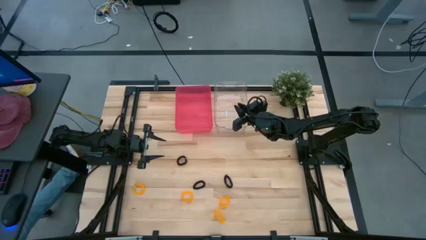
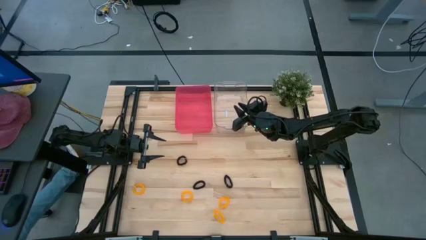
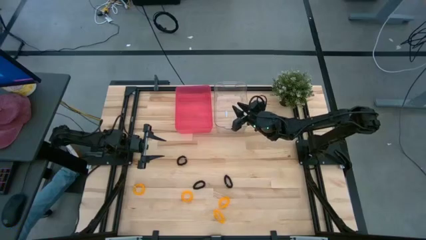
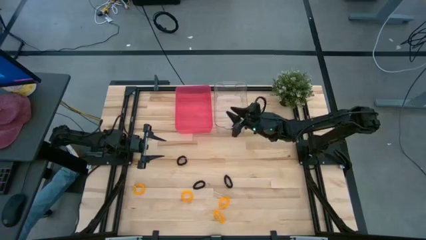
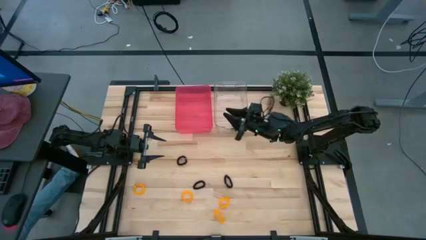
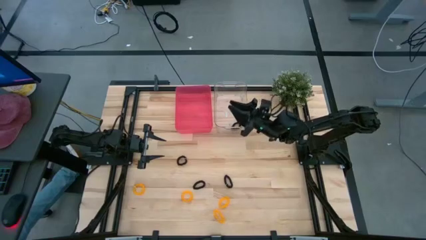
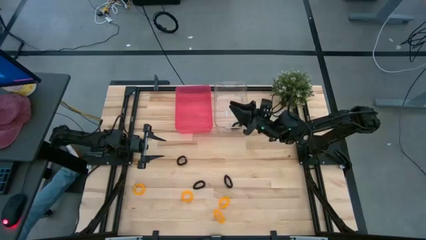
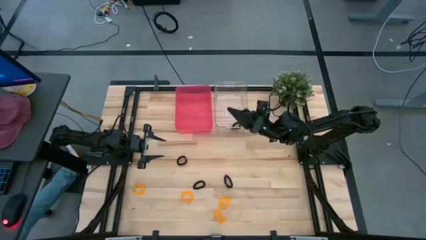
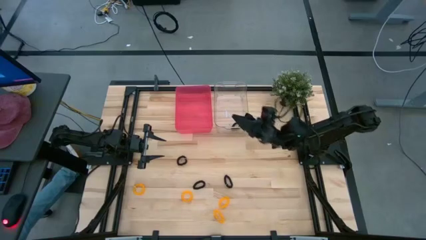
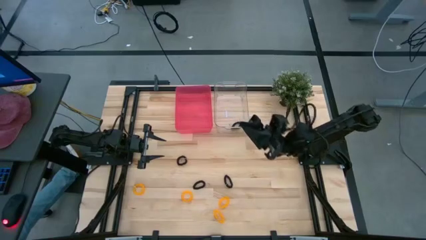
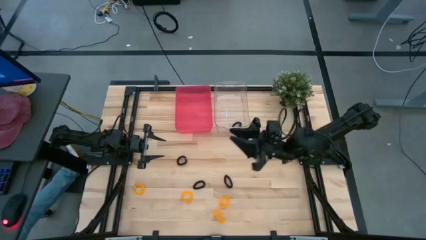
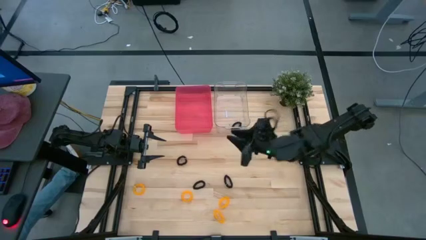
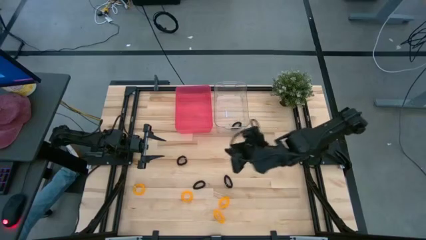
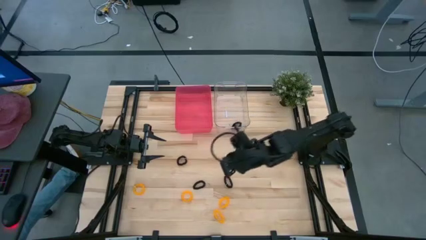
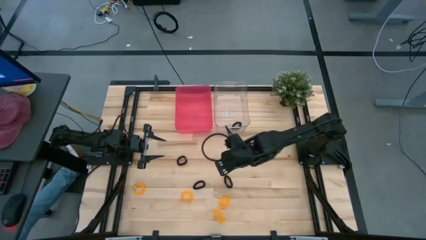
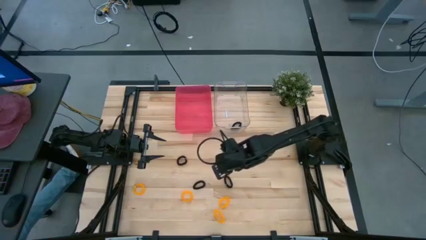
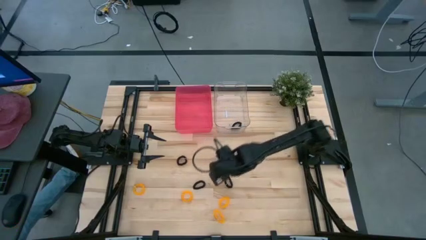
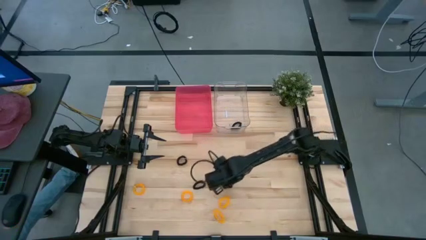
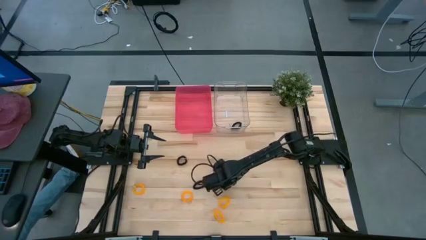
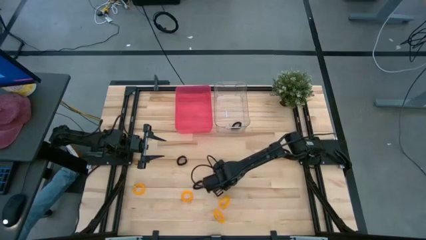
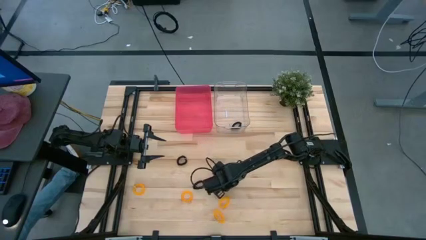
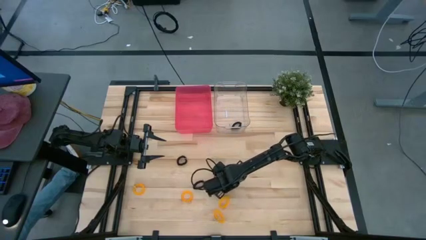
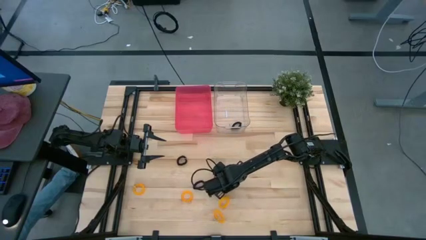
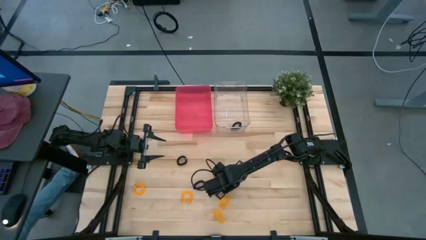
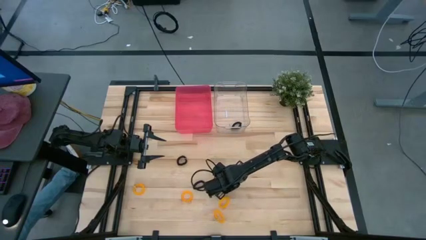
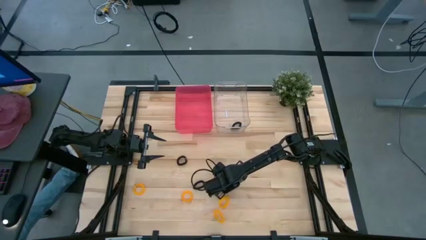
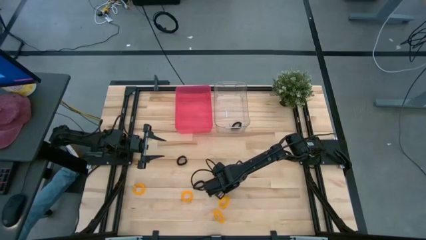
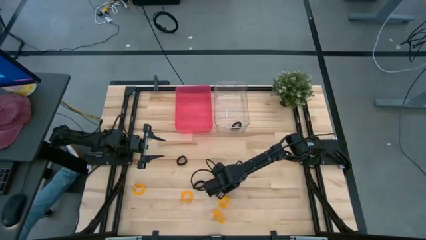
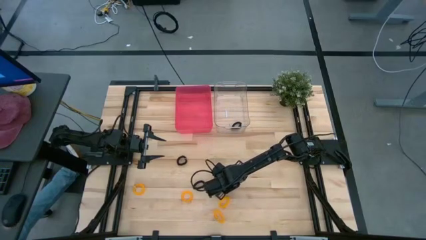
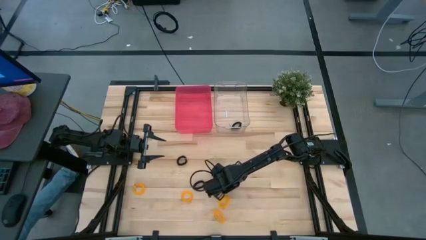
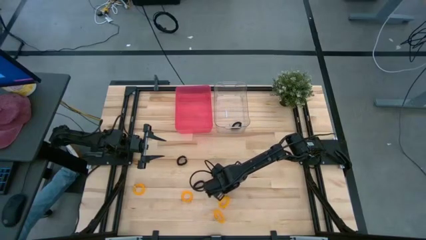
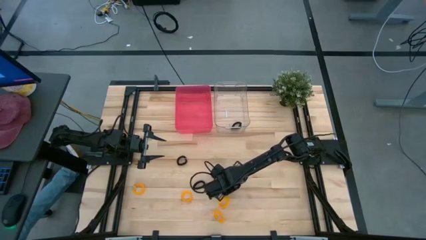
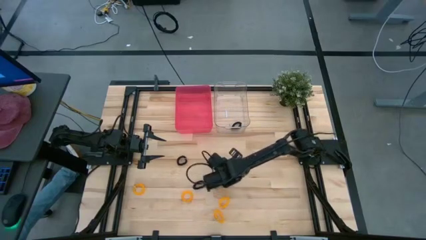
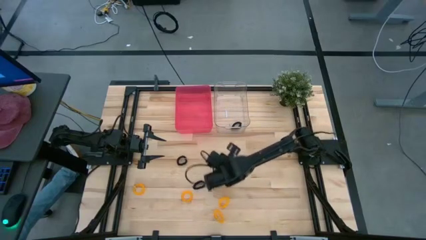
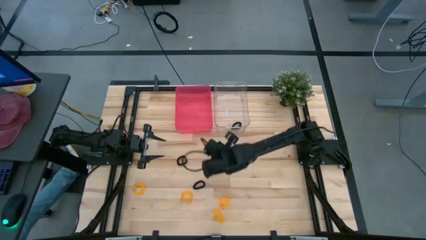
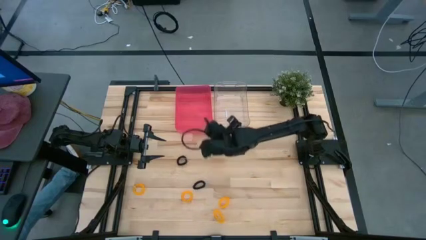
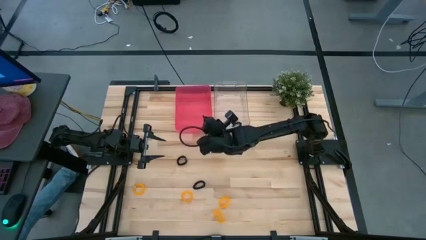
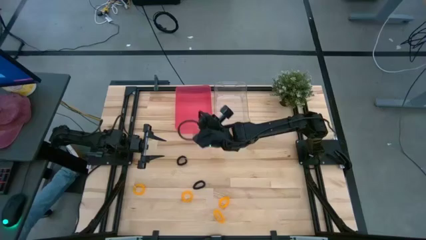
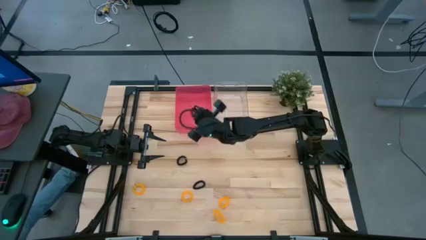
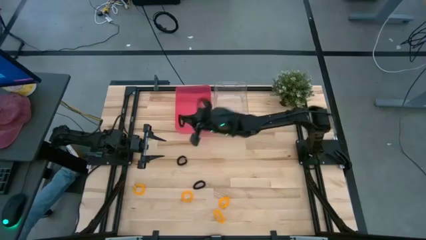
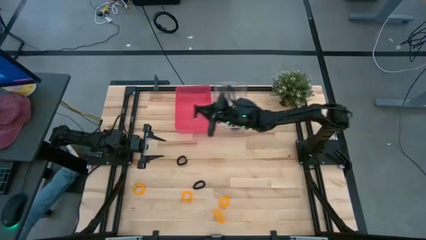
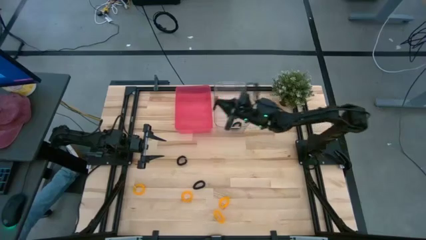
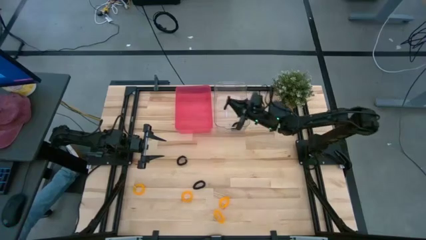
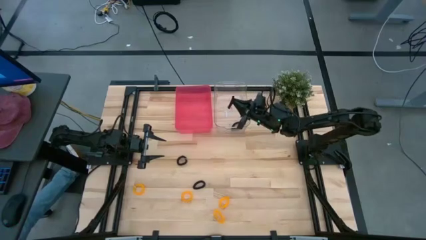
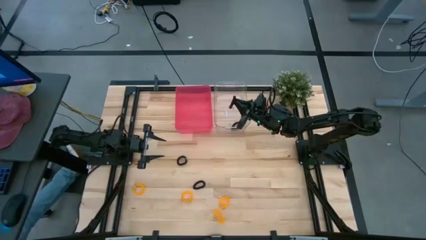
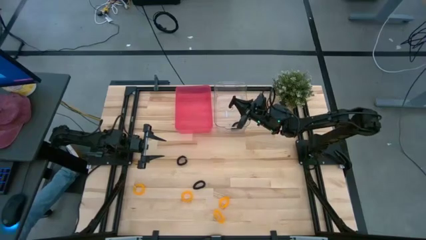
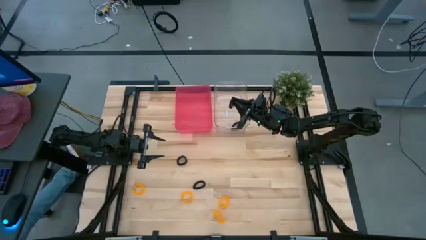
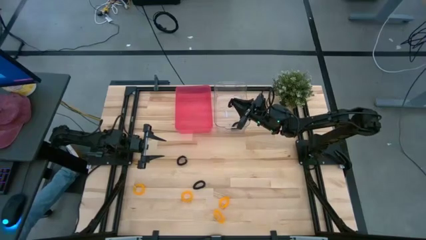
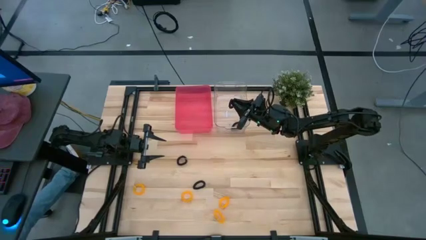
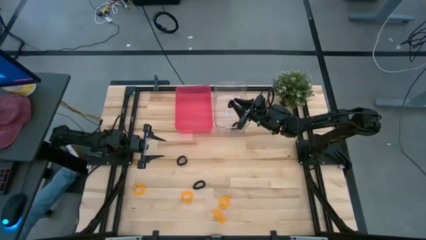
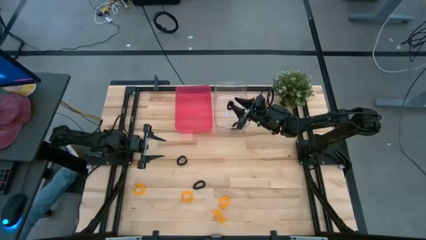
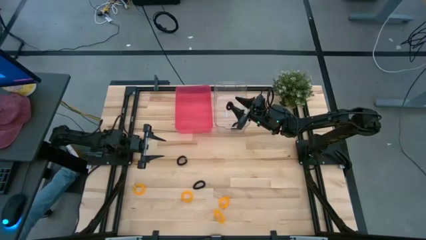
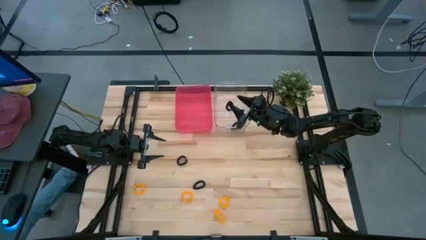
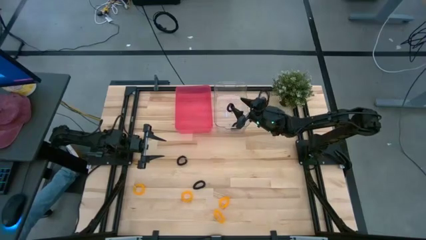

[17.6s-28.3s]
Task: Sort spring keychains
Put the black spring keychain into the transparent bin

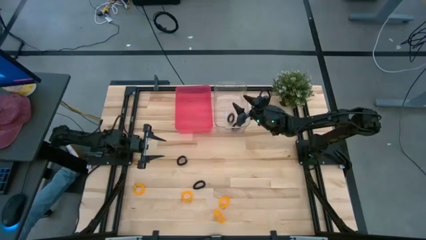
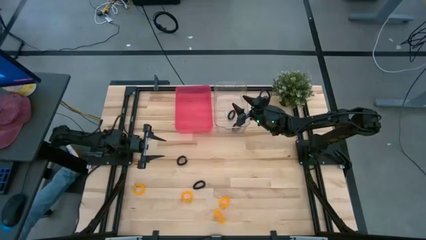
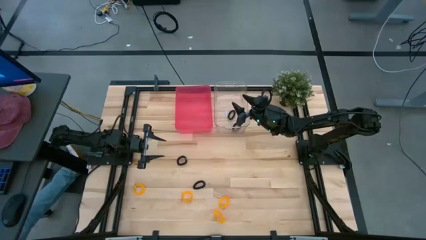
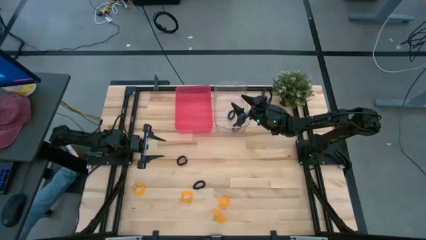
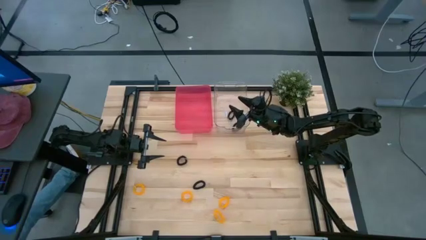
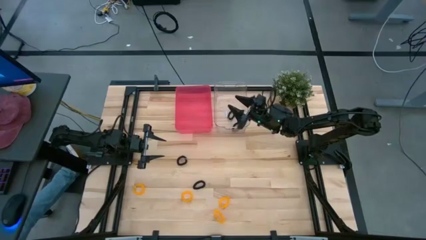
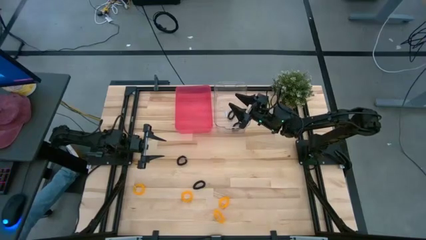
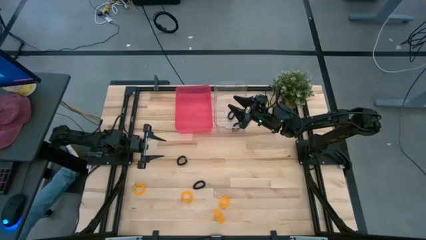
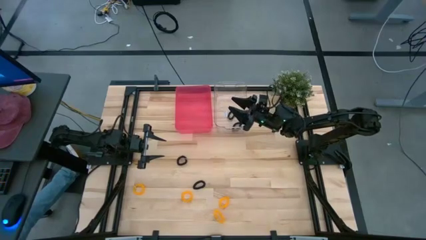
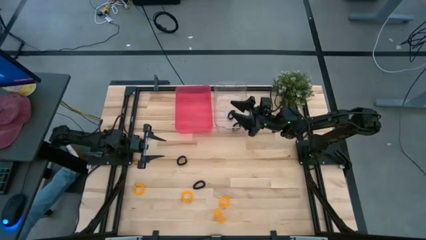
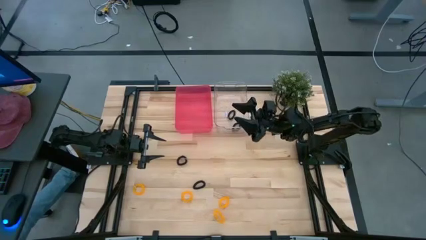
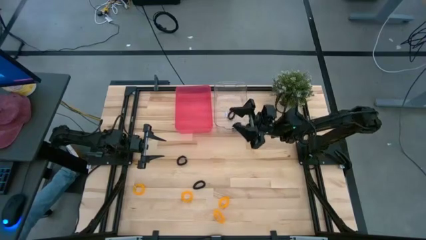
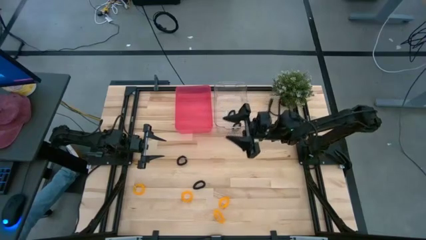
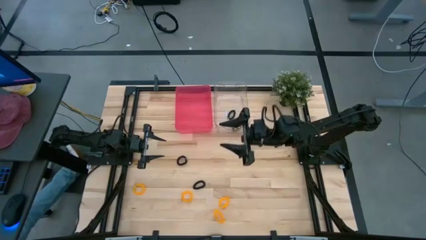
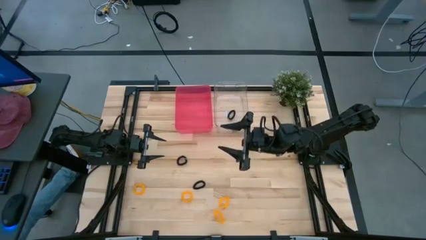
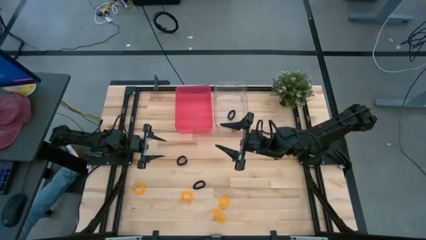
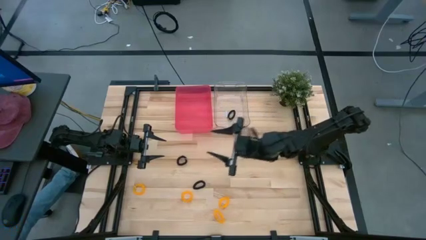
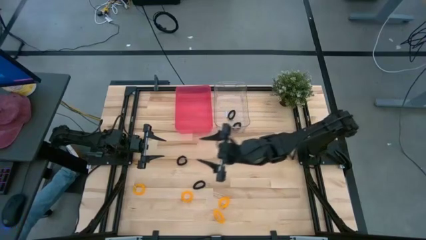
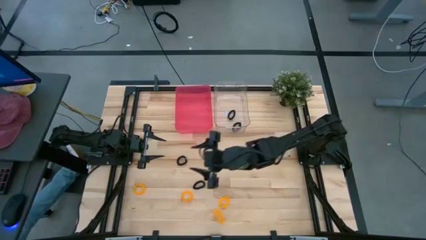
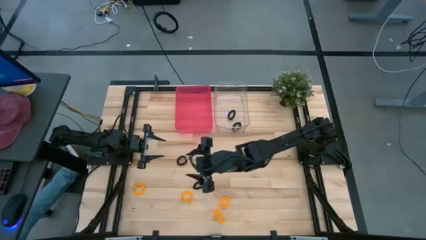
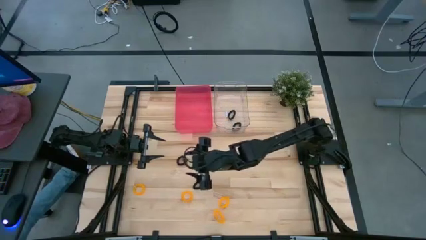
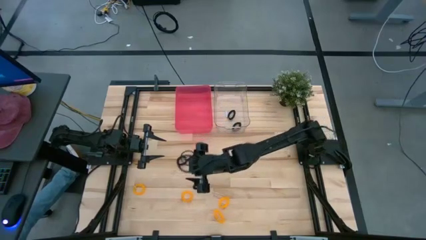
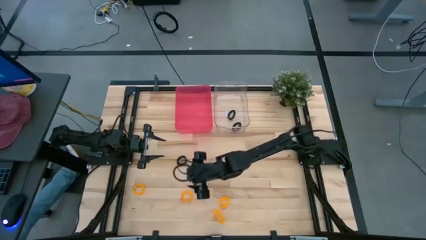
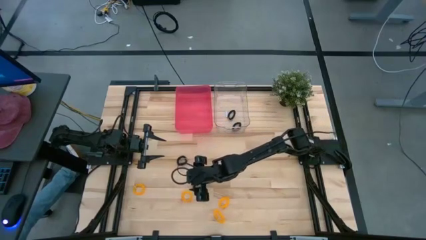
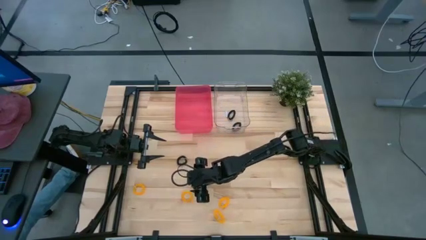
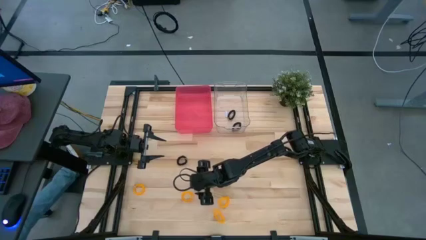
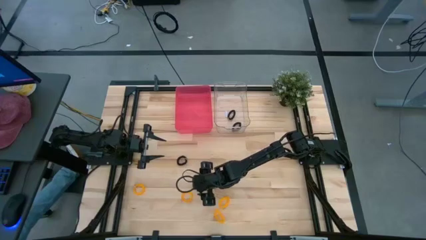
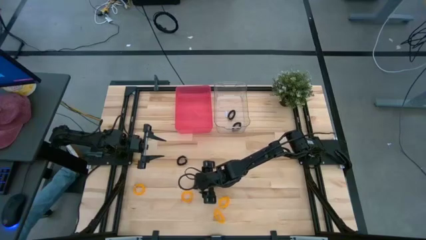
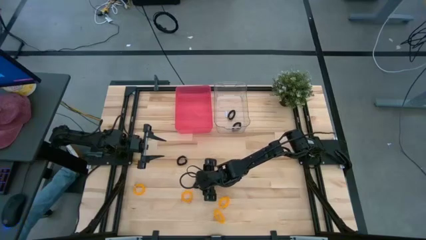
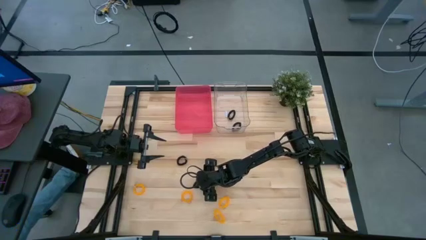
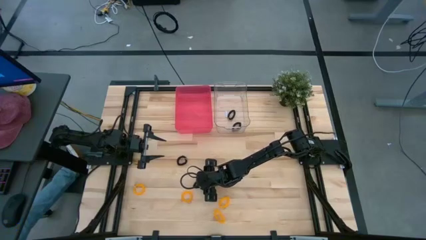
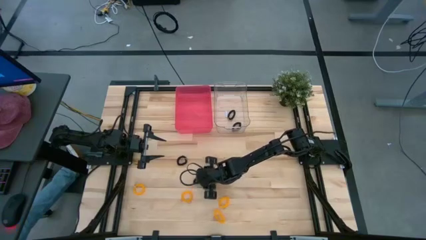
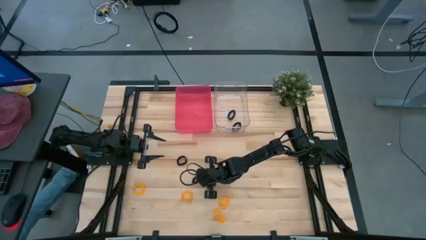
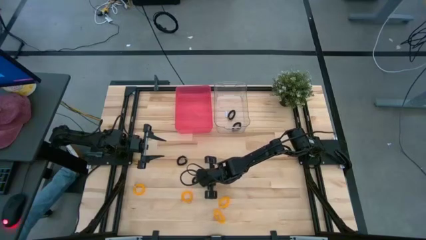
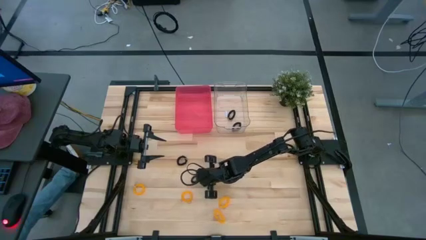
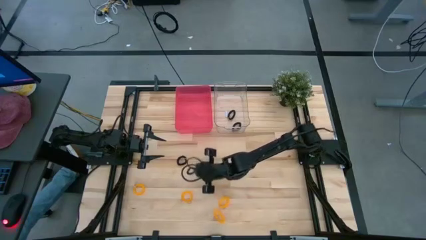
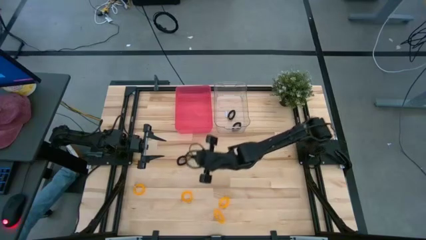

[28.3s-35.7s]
Put the black spring keychain into the transparent bin
